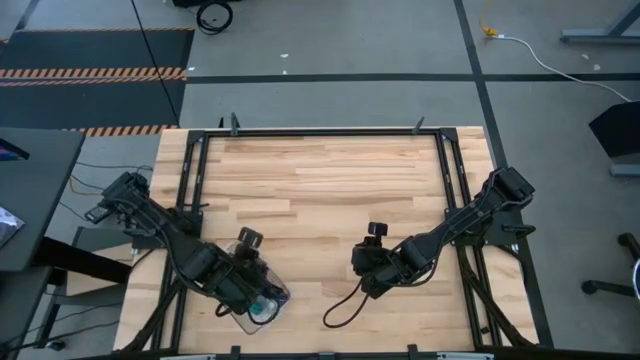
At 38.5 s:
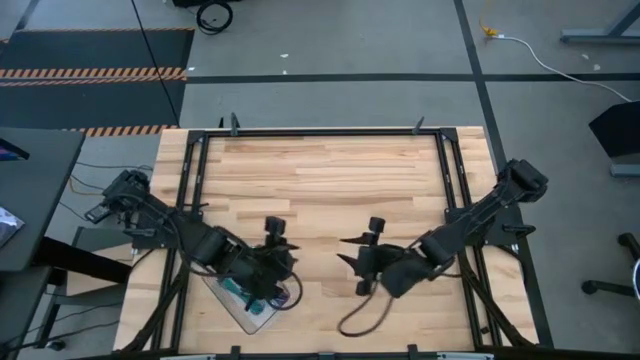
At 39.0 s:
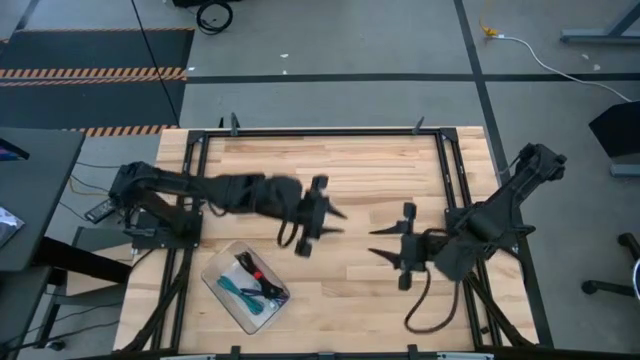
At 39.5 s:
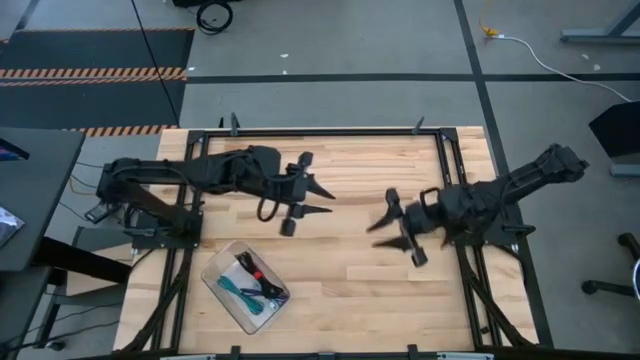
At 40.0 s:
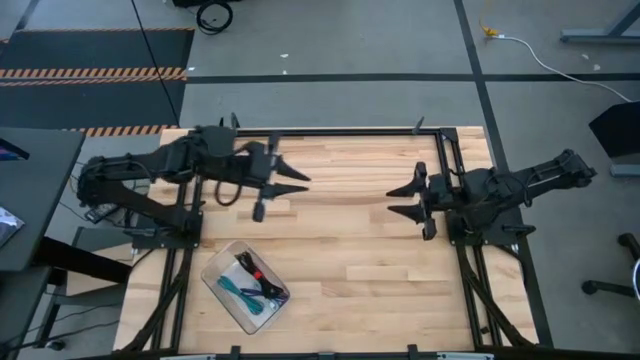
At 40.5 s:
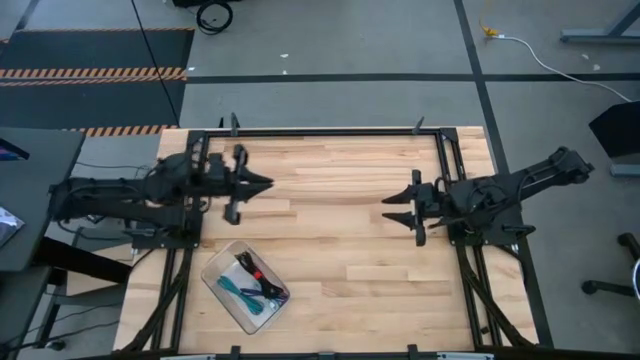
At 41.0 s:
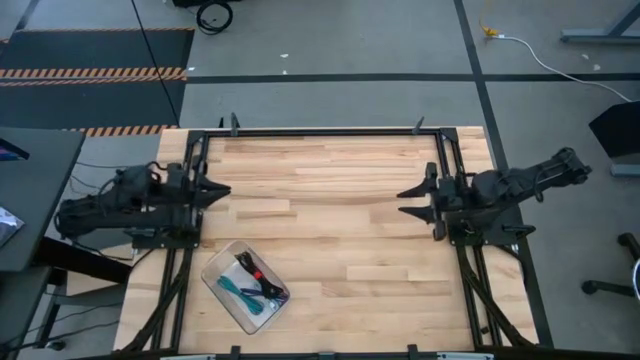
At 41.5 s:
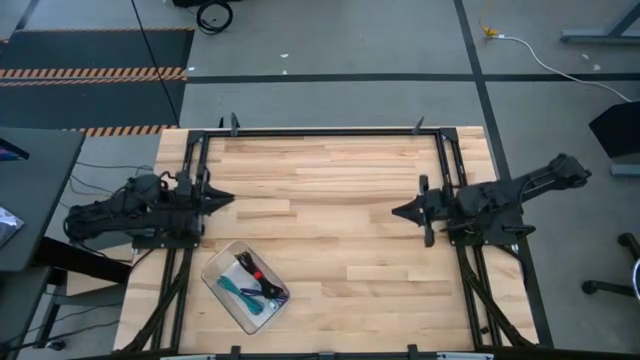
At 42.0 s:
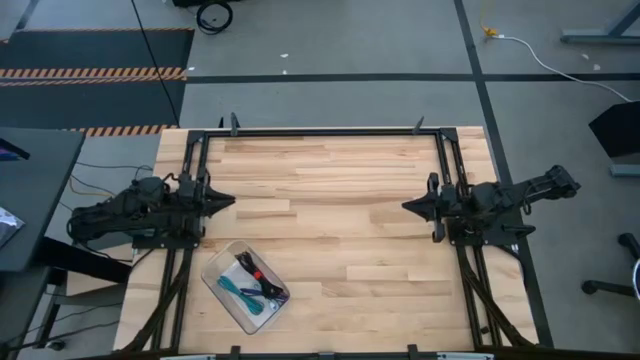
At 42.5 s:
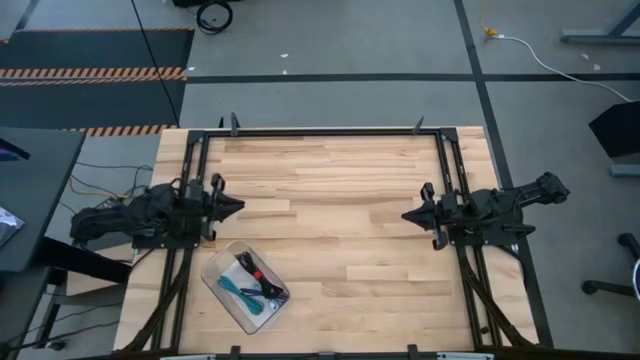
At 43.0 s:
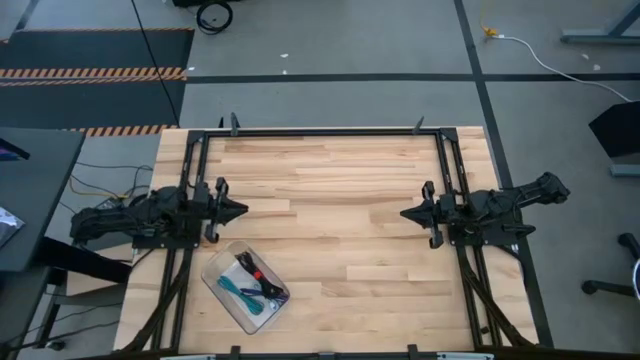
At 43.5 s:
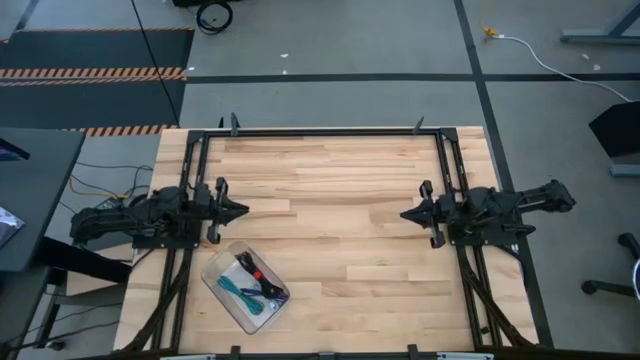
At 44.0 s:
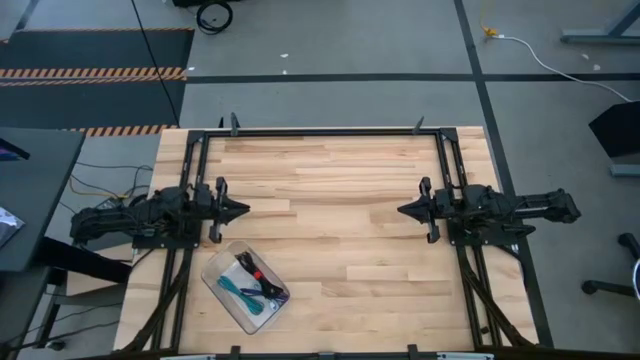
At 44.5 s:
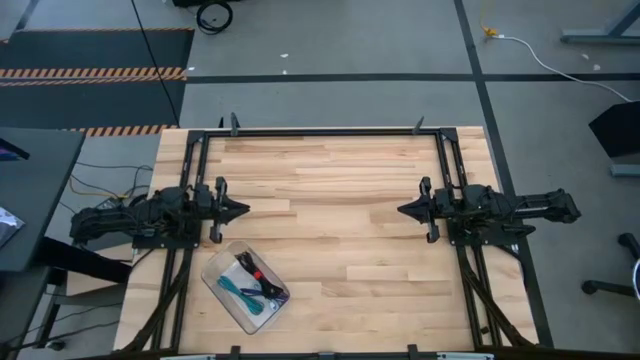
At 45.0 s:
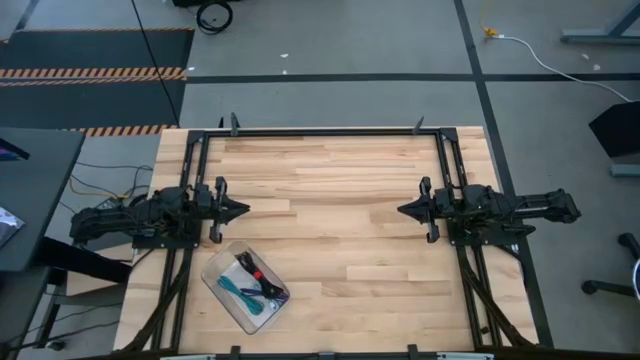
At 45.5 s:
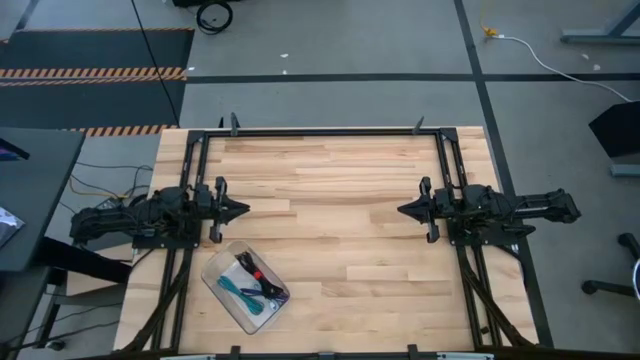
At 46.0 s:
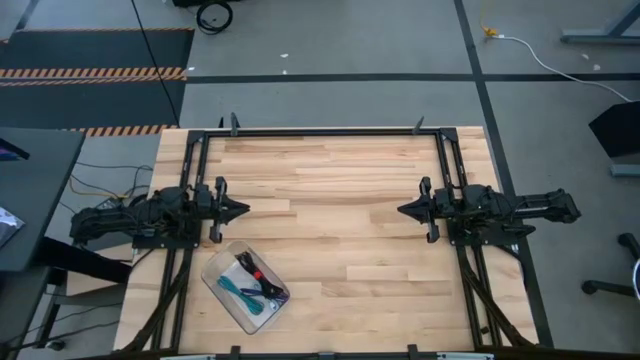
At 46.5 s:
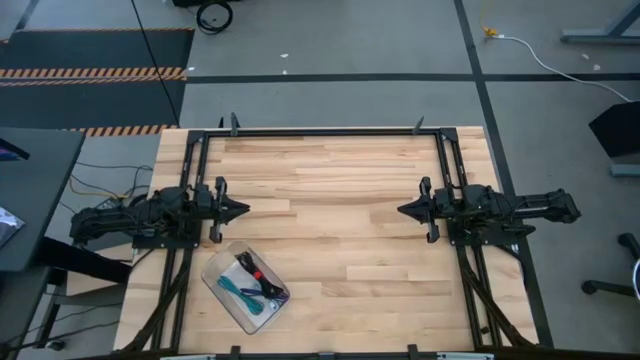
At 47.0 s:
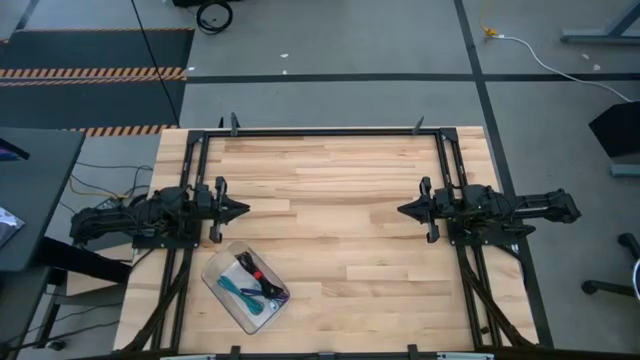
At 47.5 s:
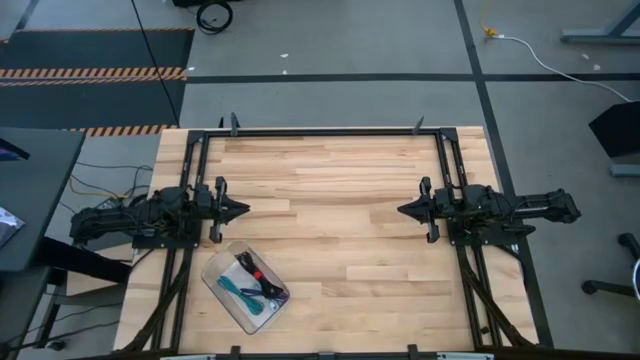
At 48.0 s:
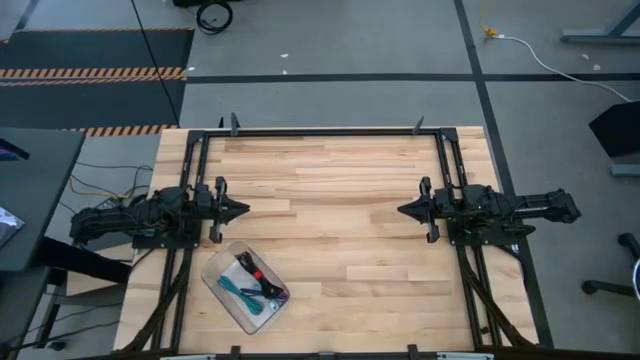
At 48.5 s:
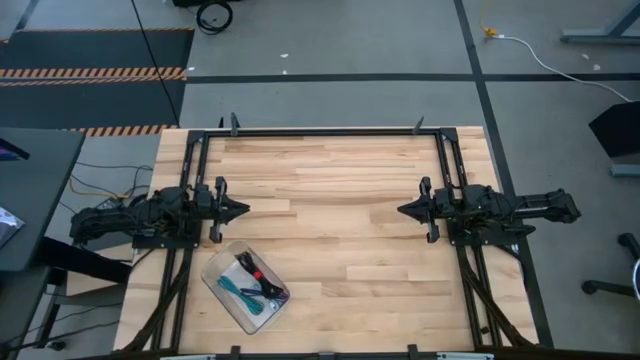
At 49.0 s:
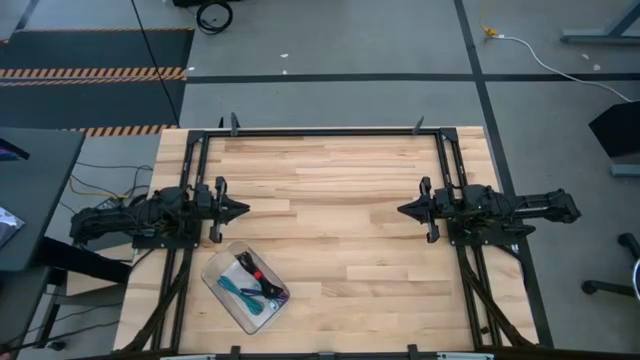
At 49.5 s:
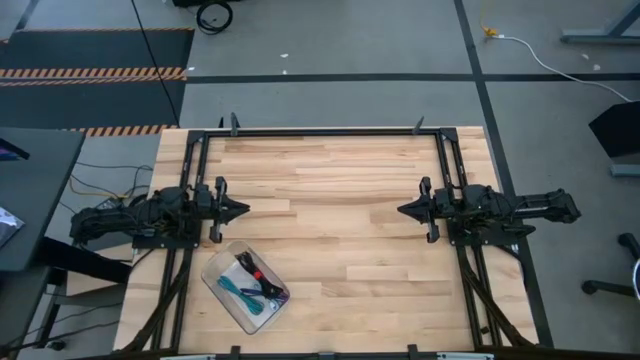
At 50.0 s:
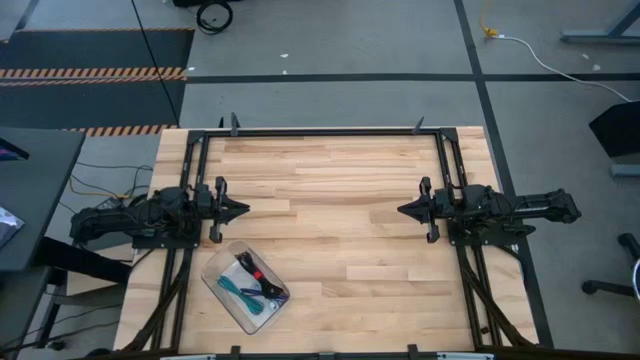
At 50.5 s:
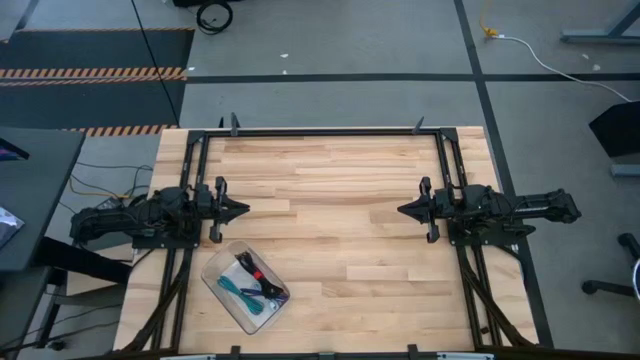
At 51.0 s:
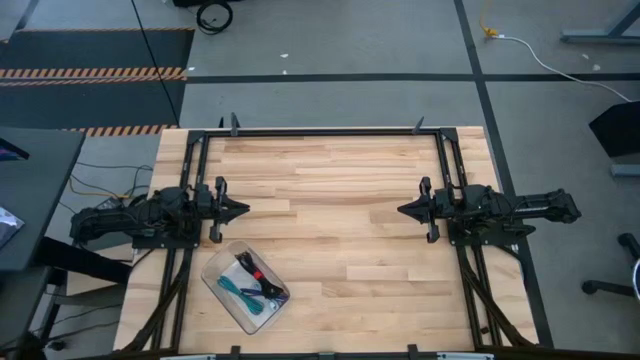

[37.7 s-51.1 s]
Task: Pick and place USB-C Cables
Return to Home Position

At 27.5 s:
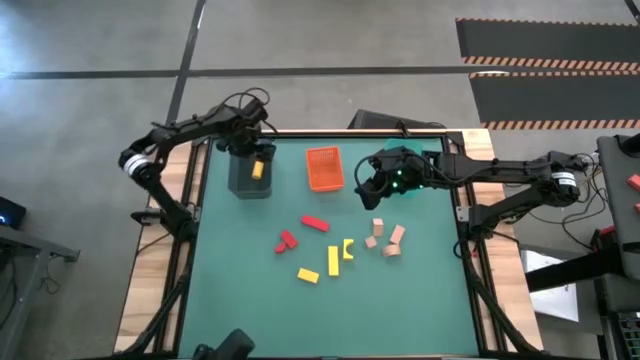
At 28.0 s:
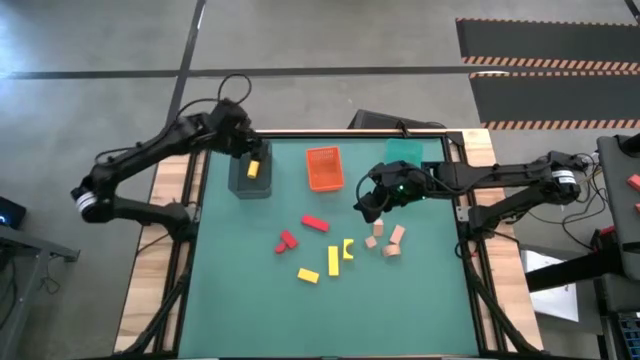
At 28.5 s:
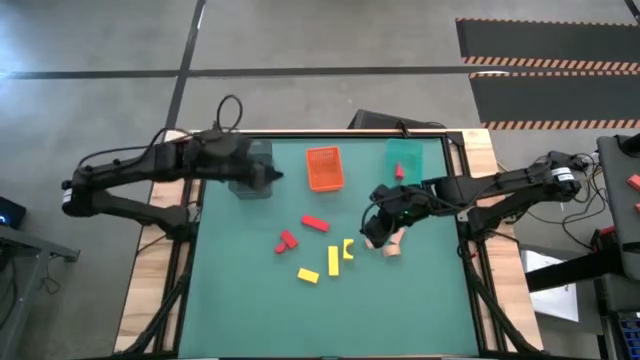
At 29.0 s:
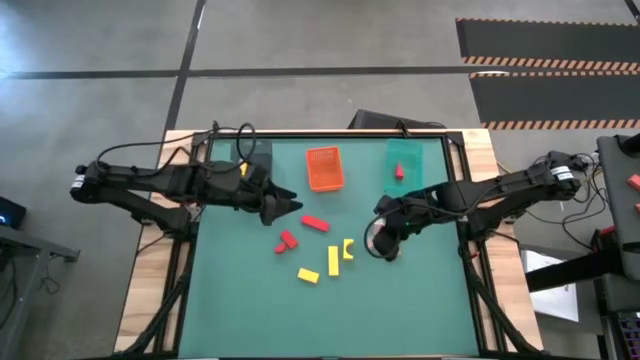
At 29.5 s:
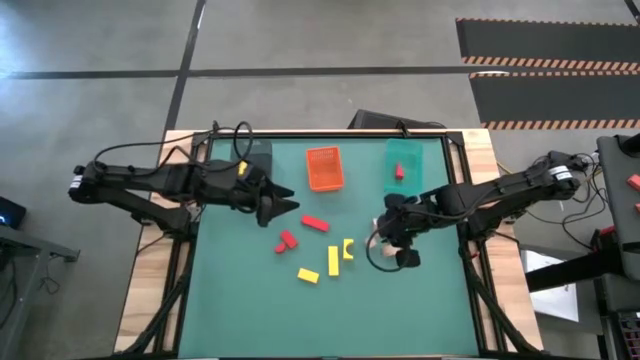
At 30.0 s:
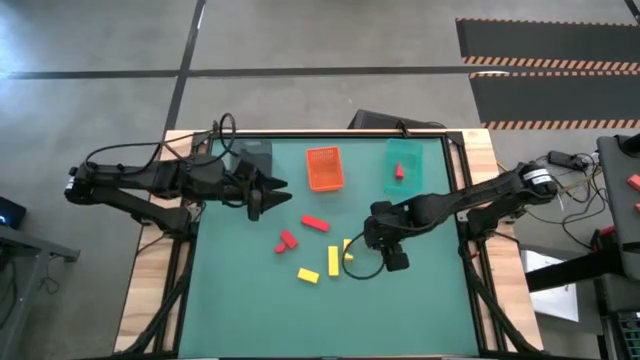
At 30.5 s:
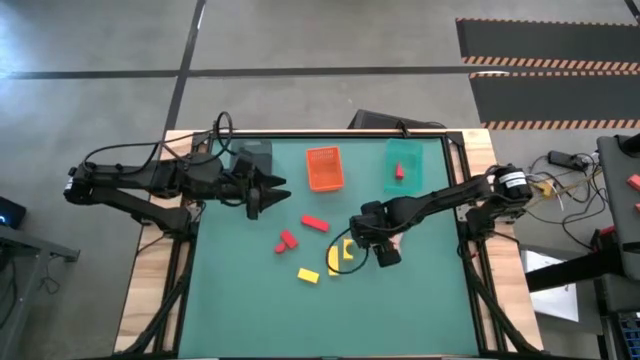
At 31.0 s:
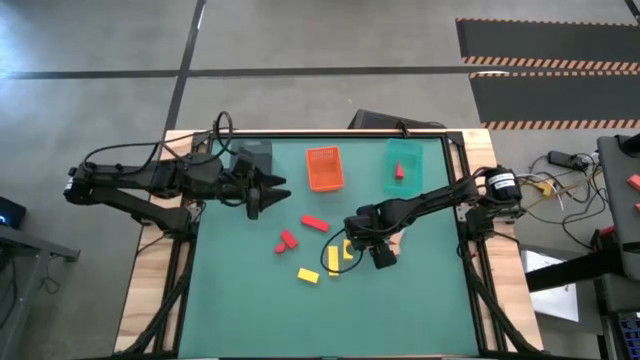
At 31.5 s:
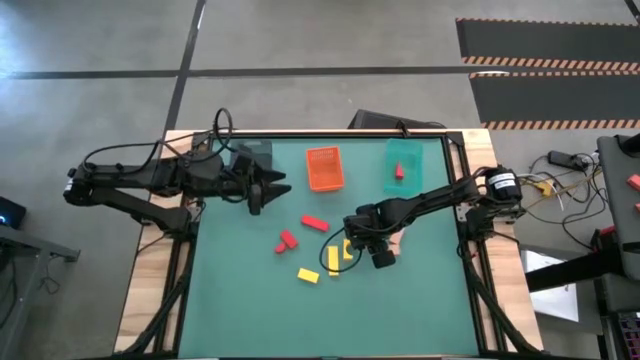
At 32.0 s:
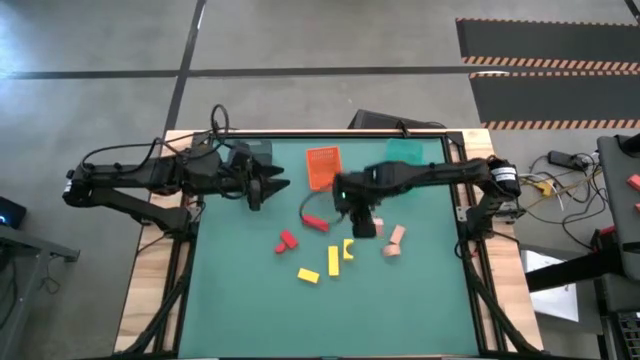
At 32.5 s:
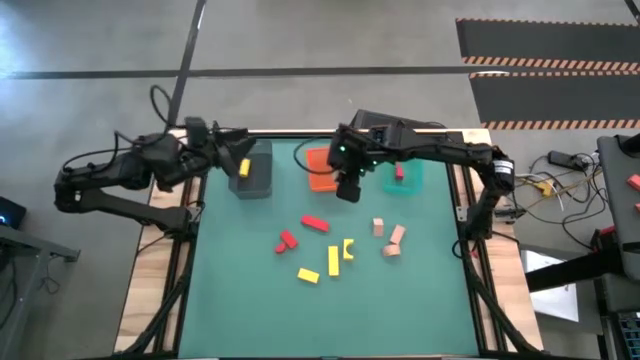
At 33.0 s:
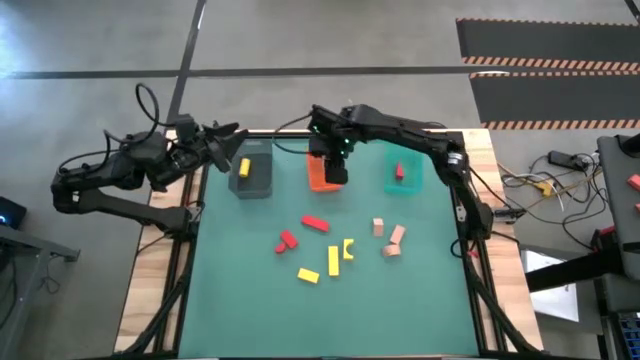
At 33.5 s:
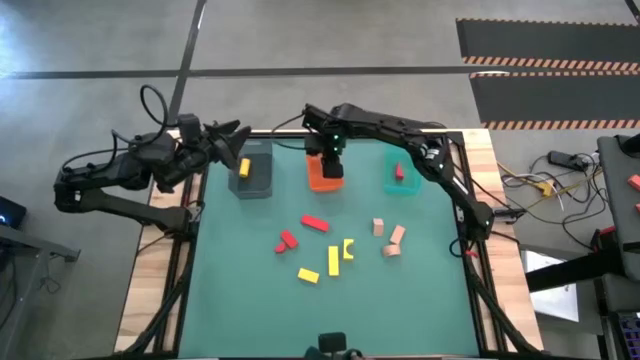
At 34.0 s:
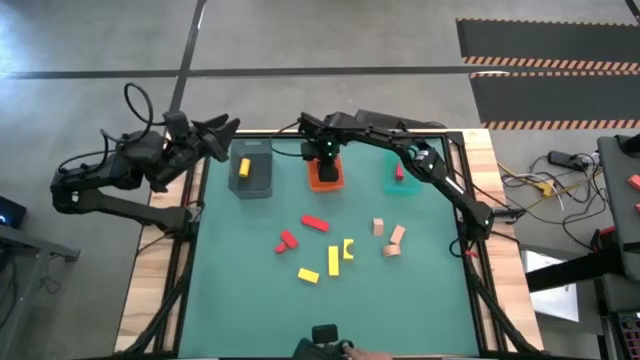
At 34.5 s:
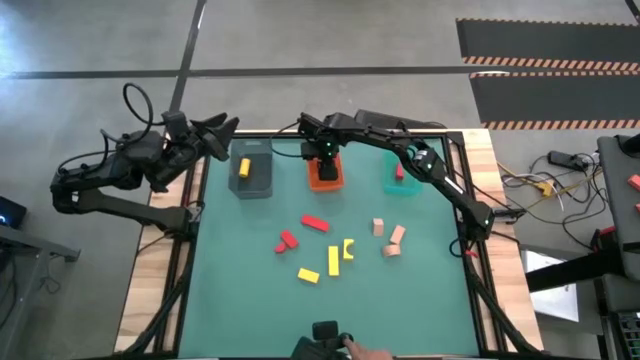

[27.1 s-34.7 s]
Task: Sort & place blocks by color
Put the brown block into the orange bin
